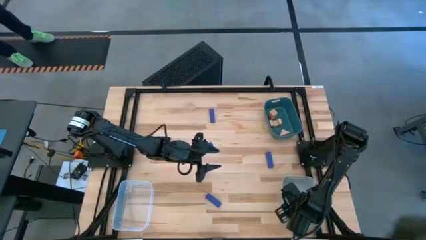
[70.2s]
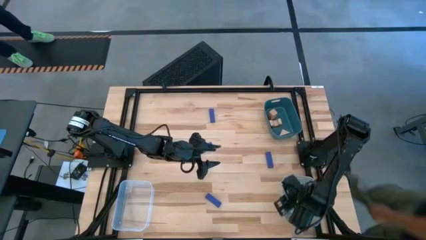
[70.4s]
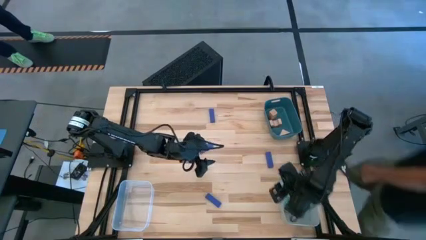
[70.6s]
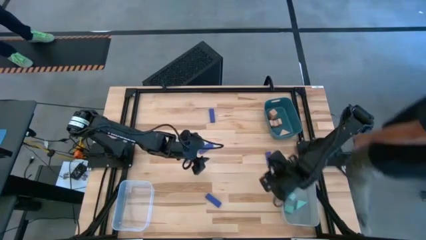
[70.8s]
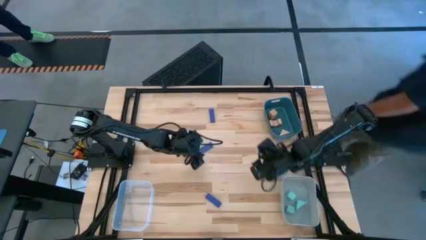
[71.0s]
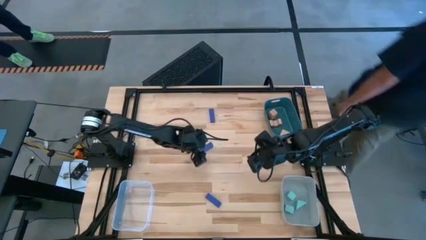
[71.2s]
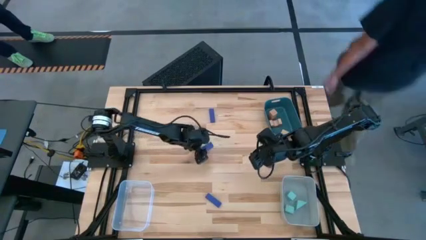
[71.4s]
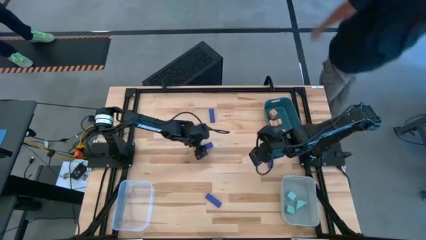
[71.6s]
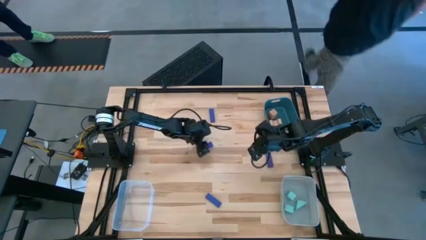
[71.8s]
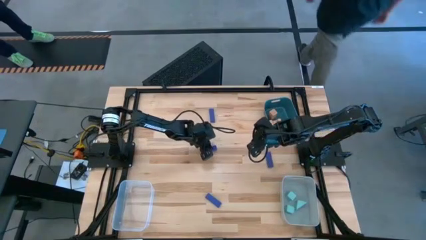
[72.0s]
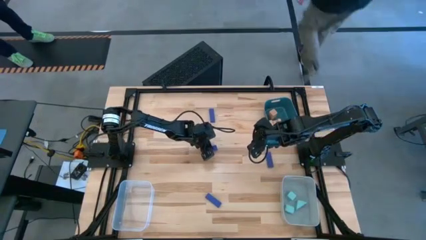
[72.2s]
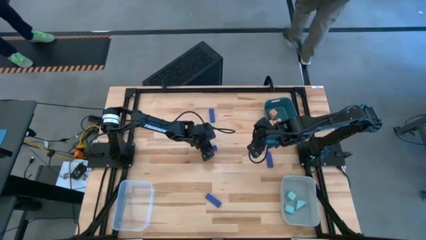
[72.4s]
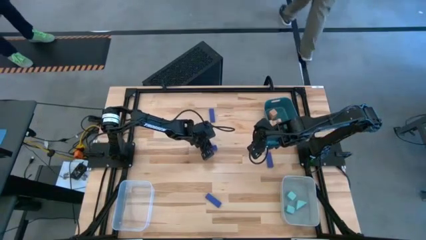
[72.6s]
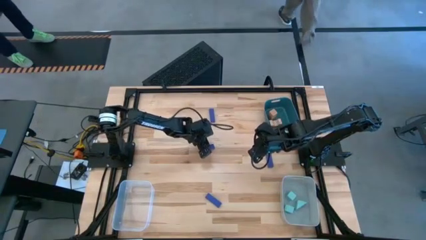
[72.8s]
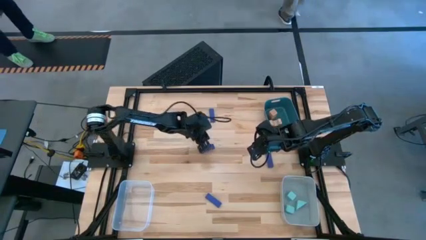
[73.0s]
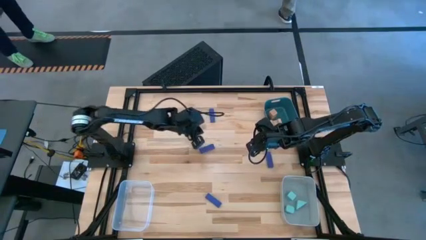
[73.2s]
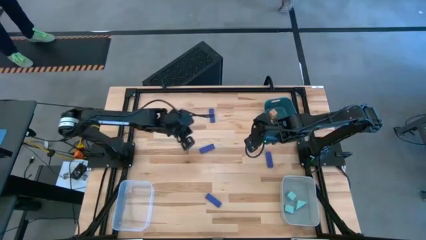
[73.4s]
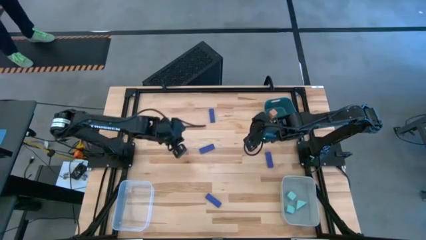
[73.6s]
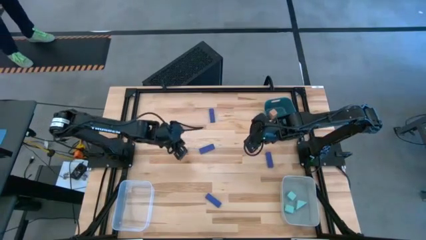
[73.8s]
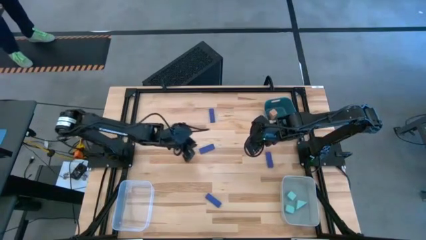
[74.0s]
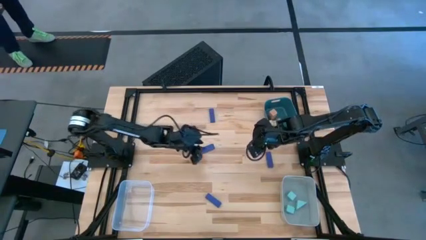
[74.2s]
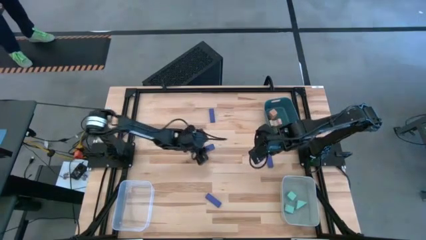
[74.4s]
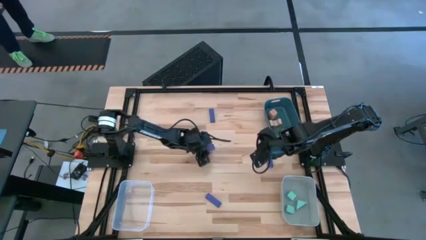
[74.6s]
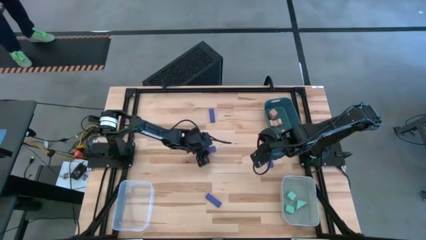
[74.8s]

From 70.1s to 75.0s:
Task: Sort & place blocks by color
Put the center blue block into the transparent bin

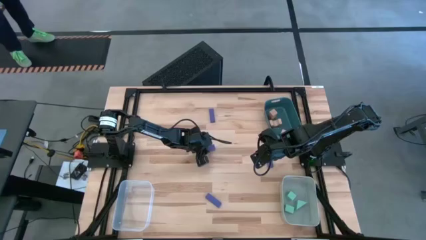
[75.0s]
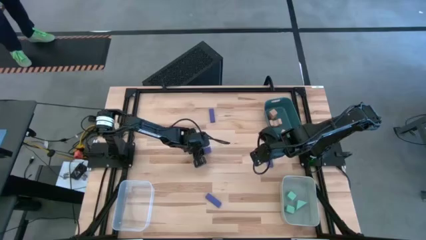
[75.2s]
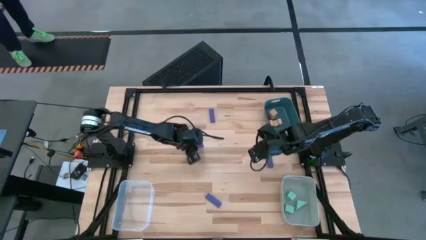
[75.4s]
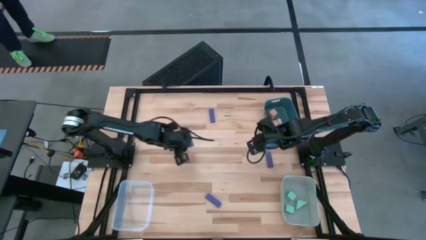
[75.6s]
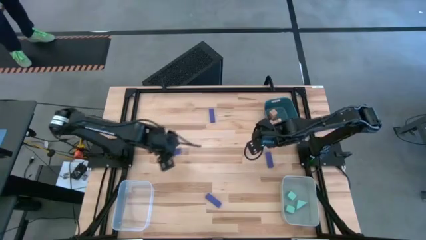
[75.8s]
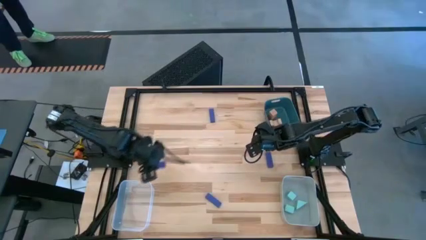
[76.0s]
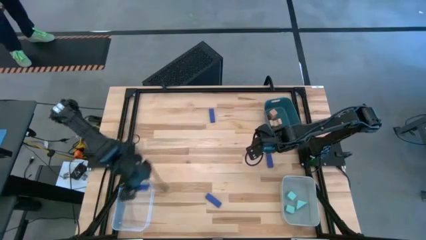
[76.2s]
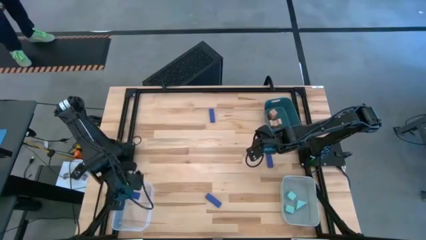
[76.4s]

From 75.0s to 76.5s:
Put the center blue block into the transparent bin

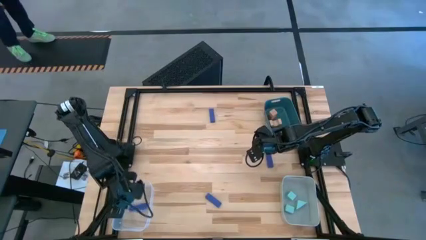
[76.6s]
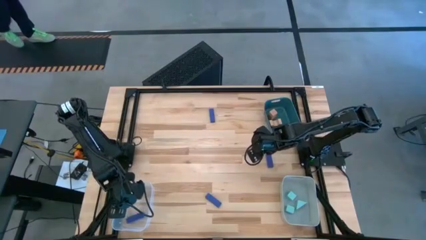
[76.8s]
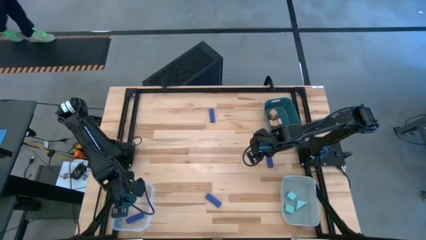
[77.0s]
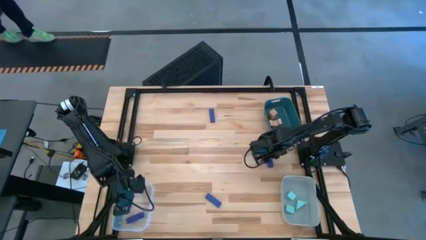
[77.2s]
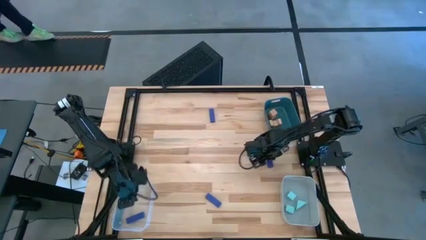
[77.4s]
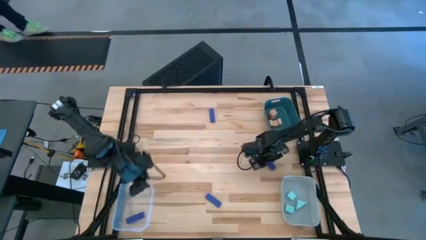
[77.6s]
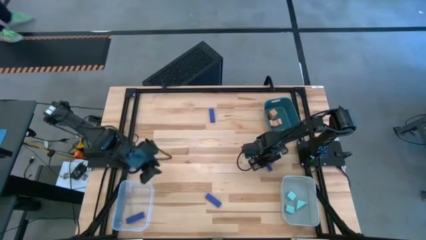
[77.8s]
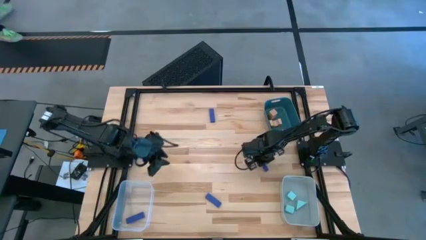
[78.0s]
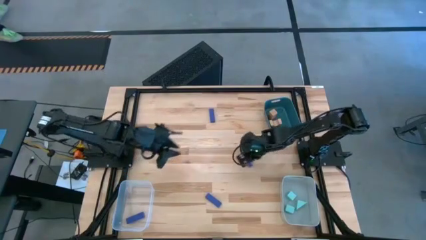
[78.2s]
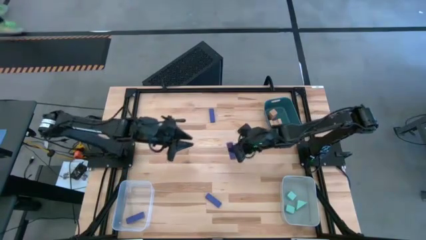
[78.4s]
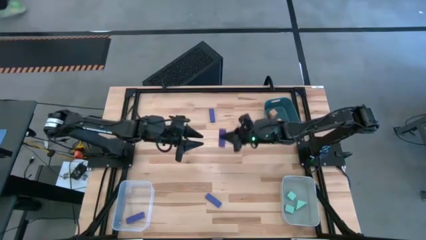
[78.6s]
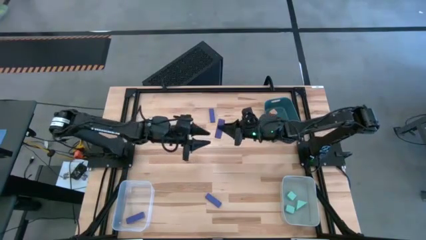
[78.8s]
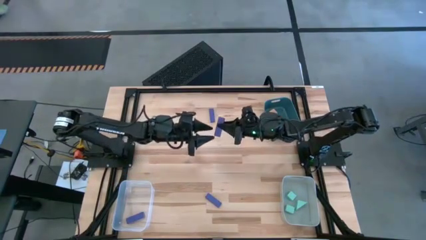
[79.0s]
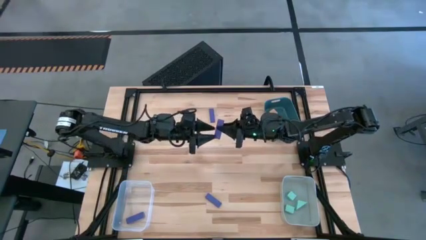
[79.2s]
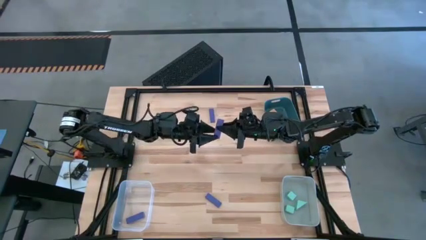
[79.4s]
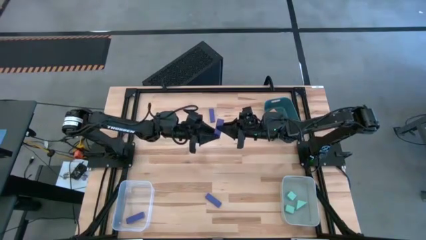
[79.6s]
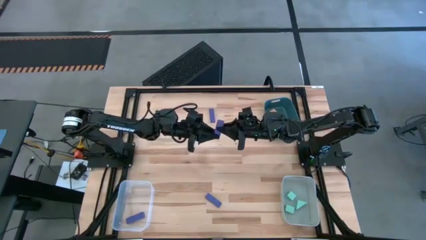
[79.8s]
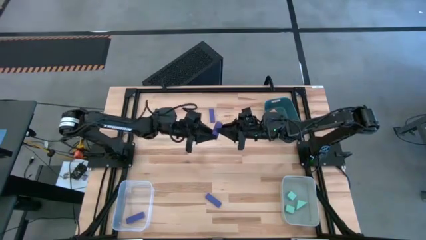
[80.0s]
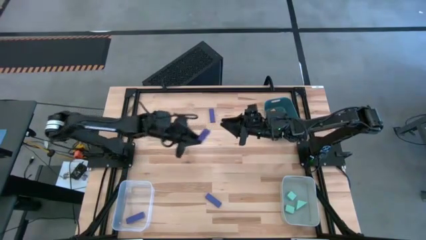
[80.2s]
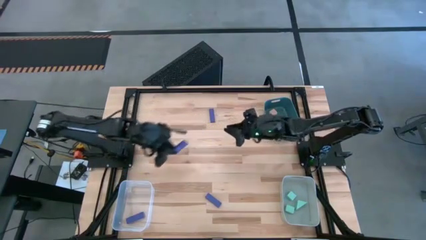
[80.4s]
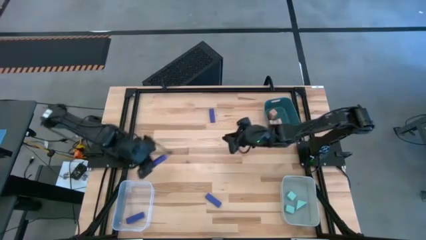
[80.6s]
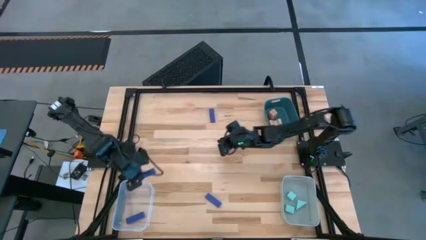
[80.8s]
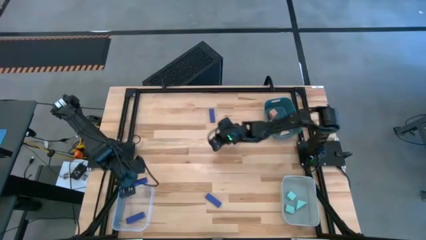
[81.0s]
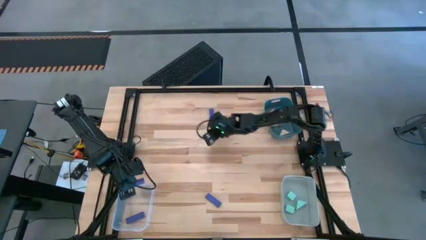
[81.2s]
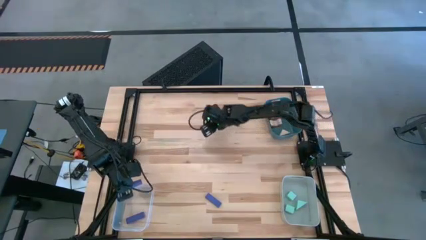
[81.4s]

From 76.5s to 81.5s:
Put the middle right blue block into the transparent bin

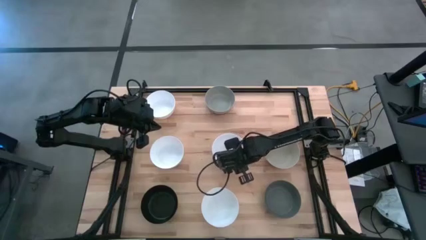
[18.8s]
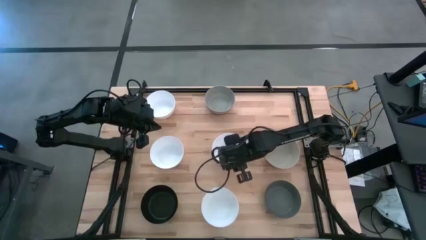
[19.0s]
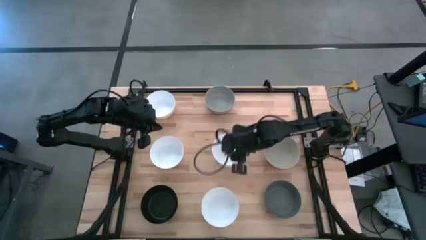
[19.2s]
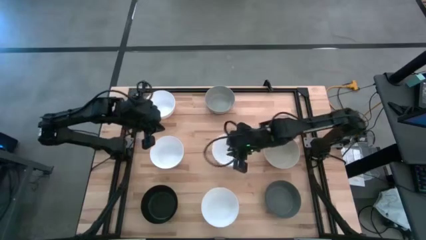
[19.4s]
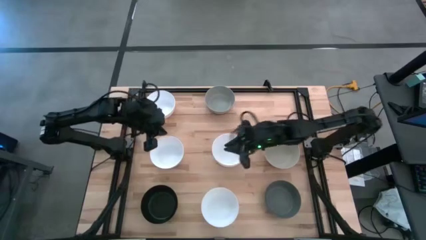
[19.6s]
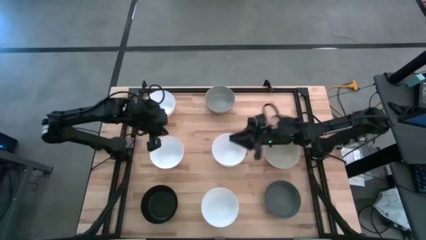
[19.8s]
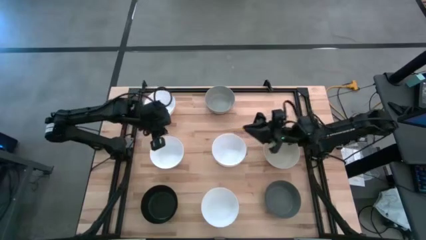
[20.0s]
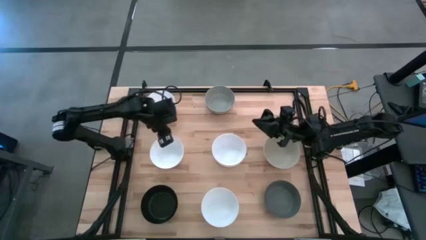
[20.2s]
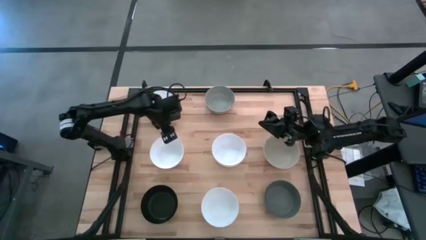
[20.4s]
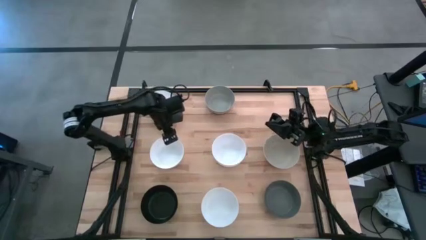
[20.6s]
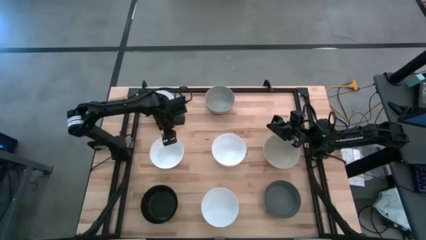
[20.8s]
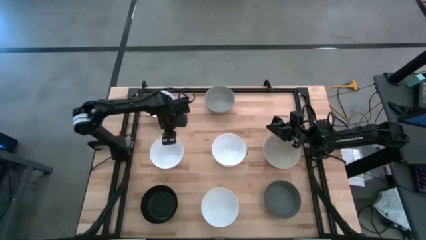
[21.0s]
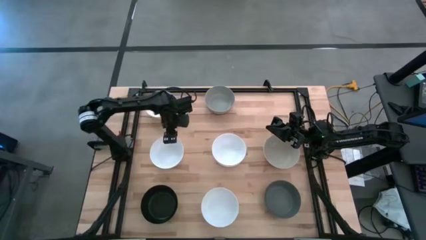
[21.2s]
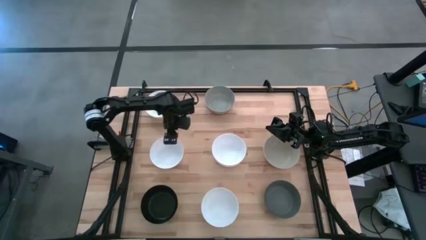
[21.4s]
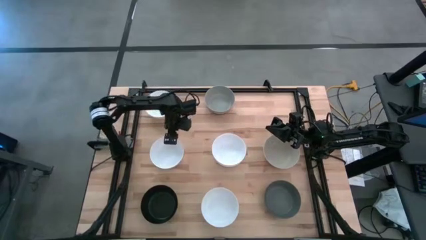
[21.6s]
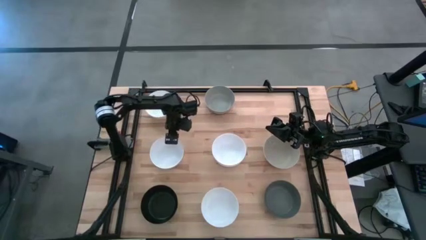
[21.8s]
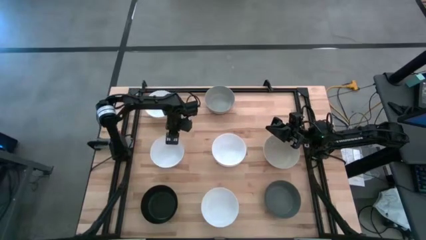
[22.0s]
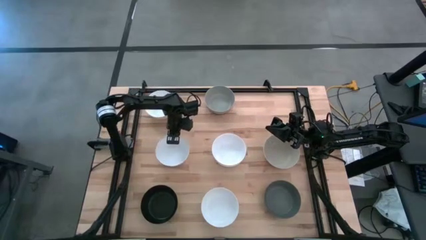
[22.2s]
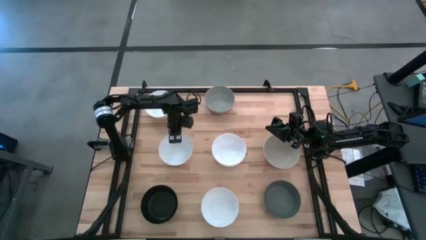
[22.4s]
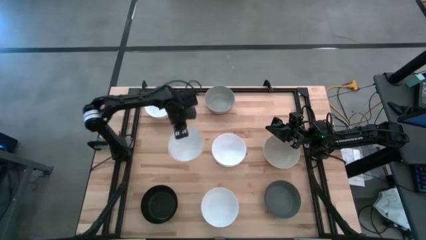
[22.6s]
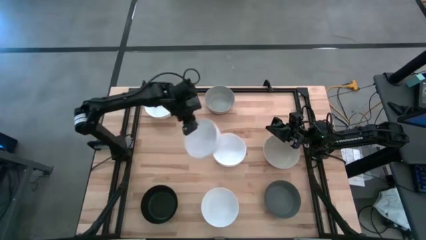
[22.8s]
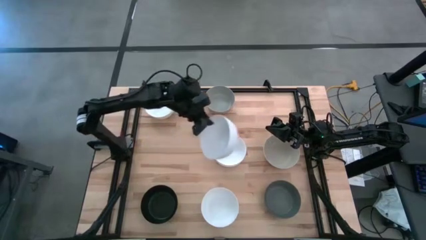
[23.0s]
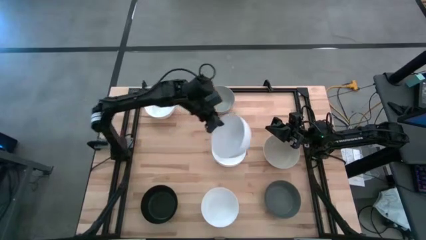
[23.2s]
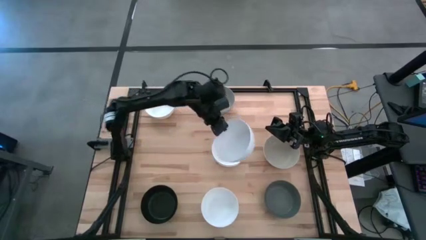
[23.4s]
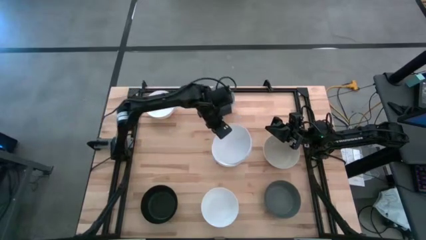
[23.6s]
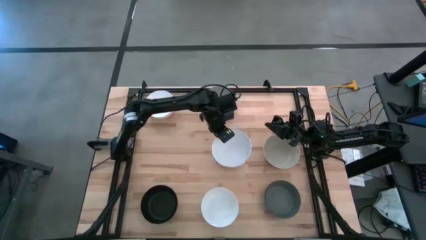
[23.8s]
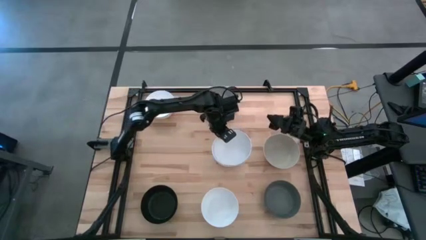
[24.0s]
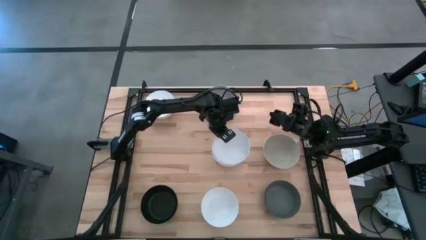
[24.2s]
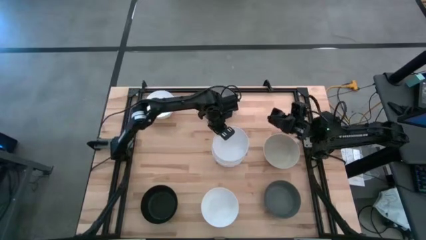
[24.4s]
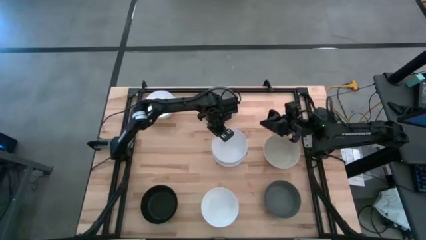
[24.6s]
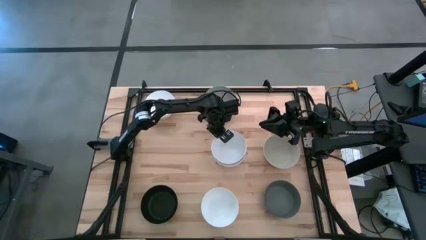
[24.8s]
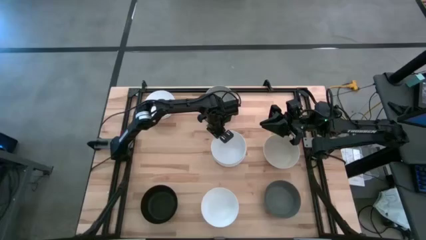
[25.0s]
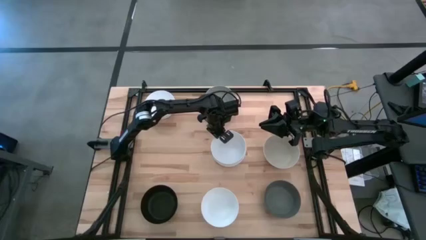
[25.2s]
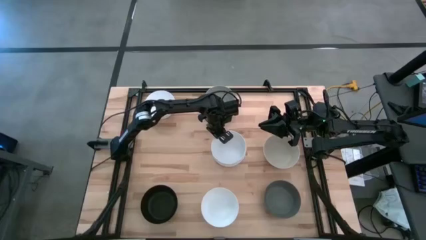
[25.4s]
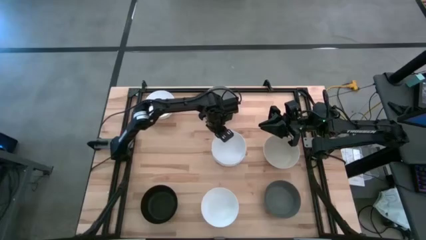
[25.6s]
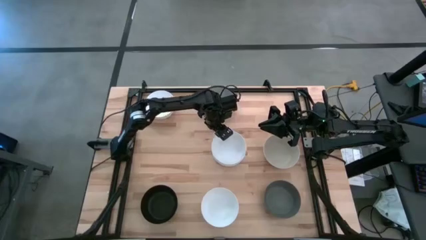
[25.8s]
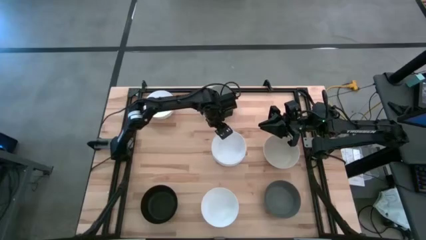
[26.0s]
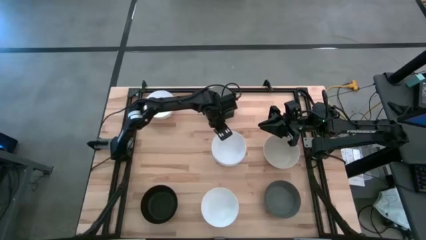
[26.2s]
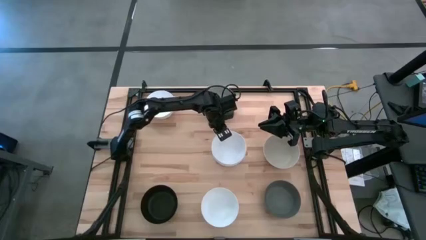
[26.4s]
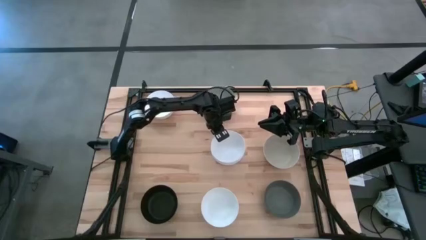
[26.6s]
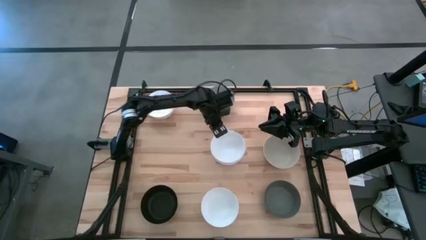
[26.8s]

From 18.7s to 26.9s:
Task: Nest bowls inside each other
Stack the left white bowl on the right white bowl
